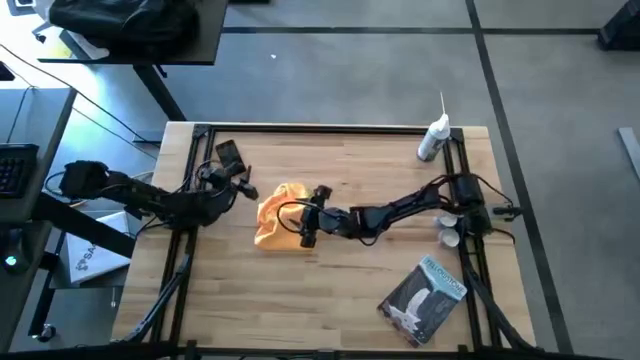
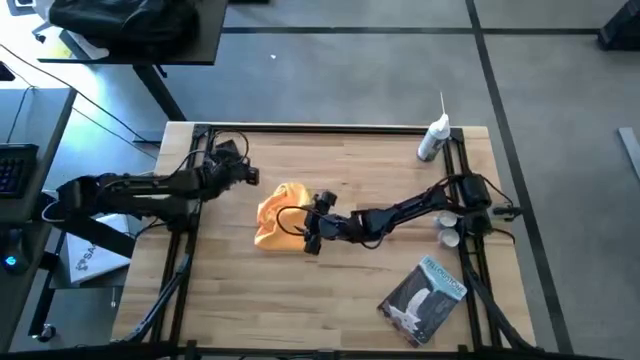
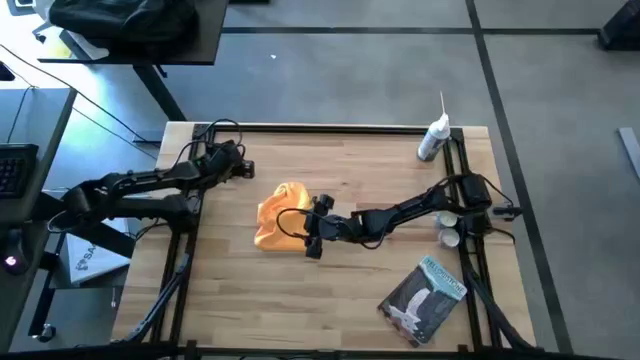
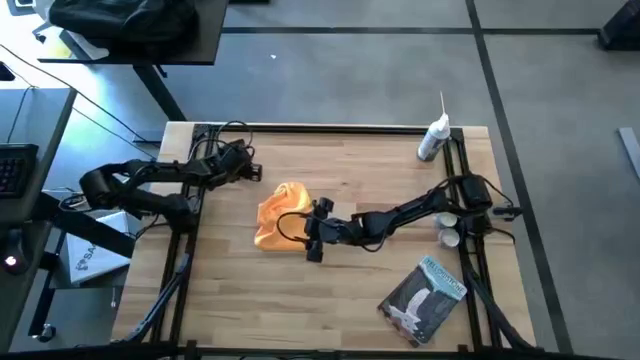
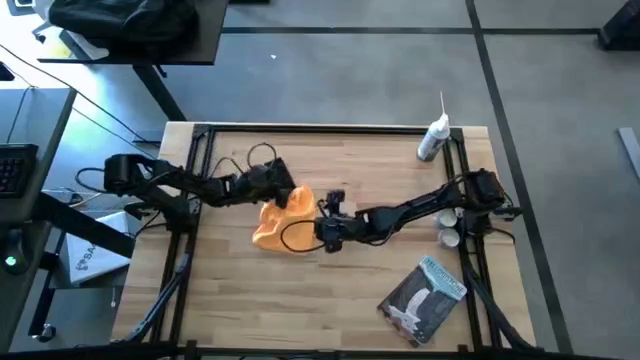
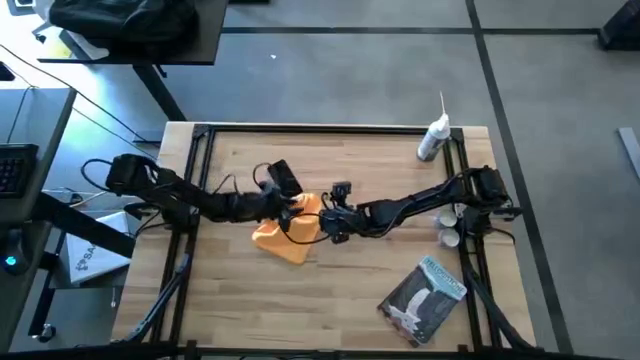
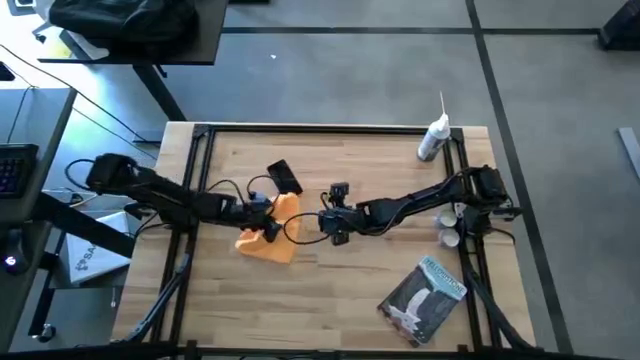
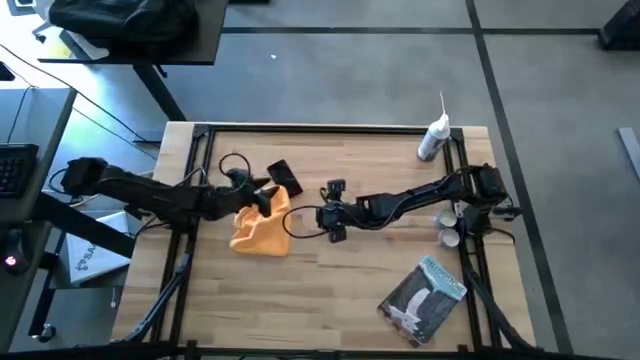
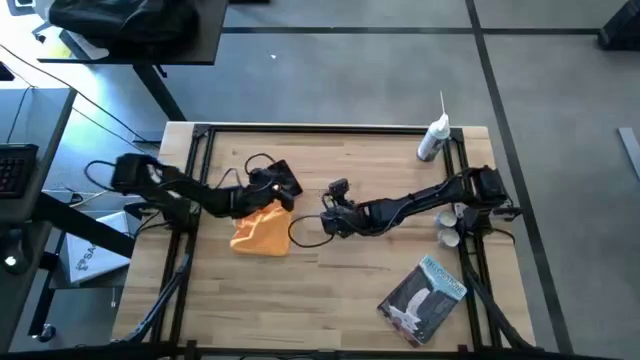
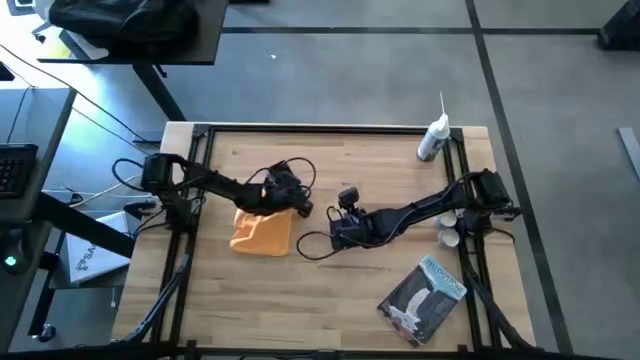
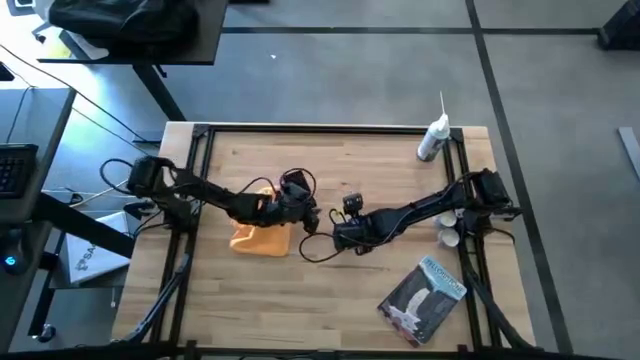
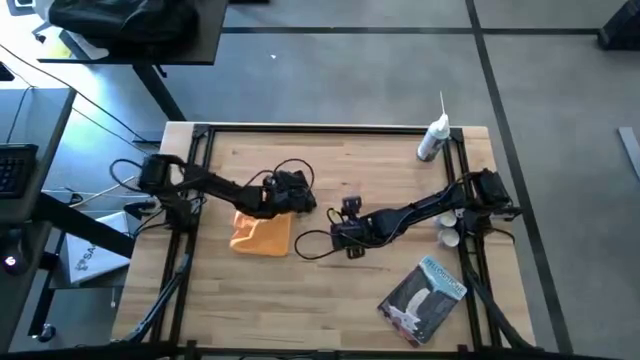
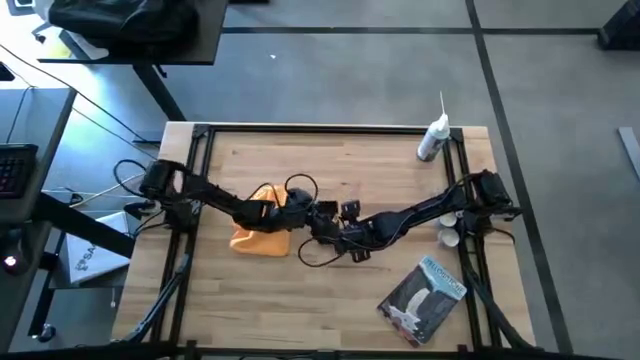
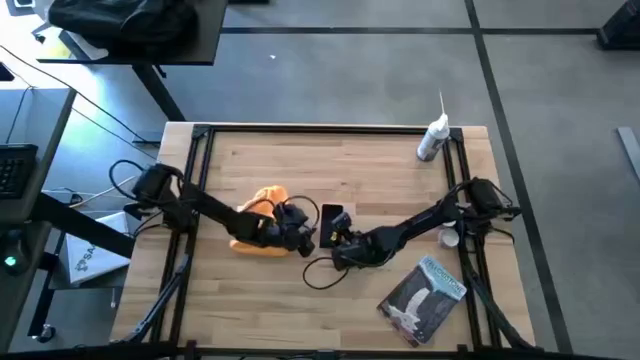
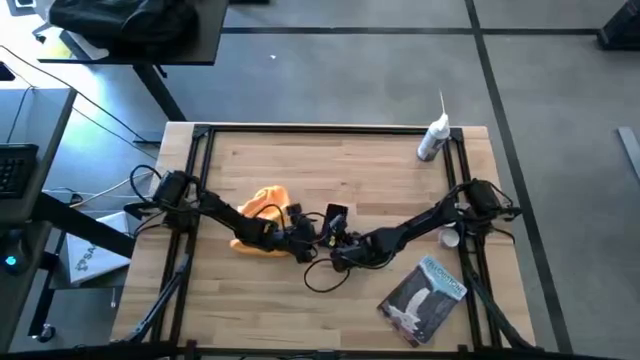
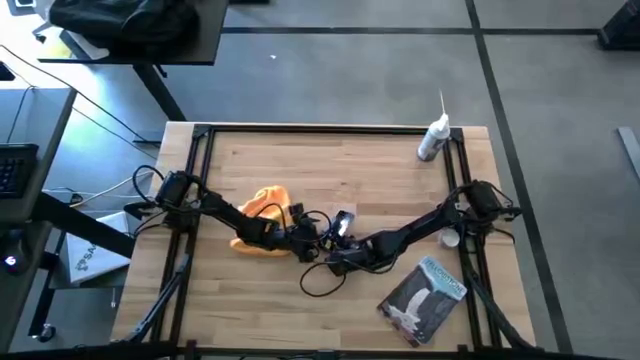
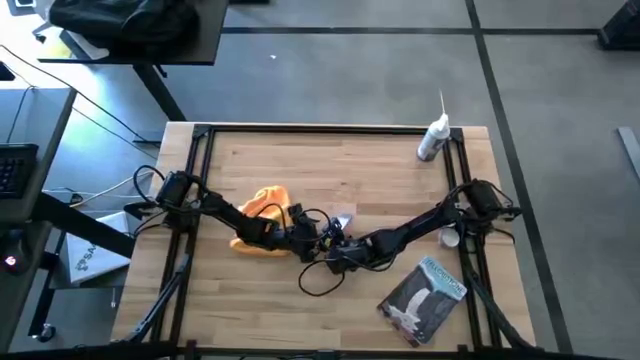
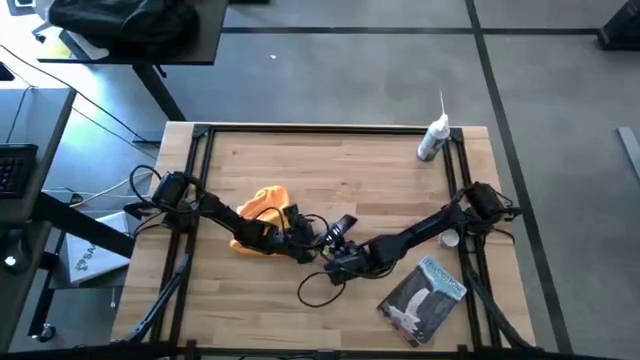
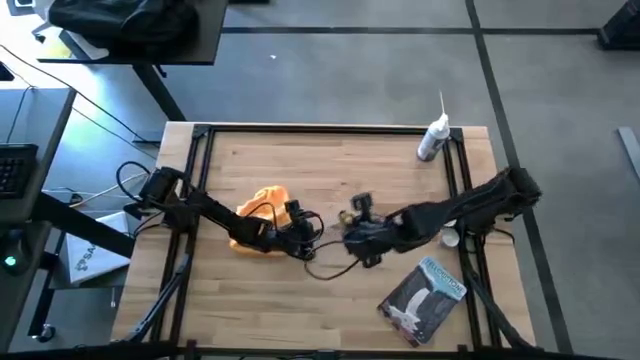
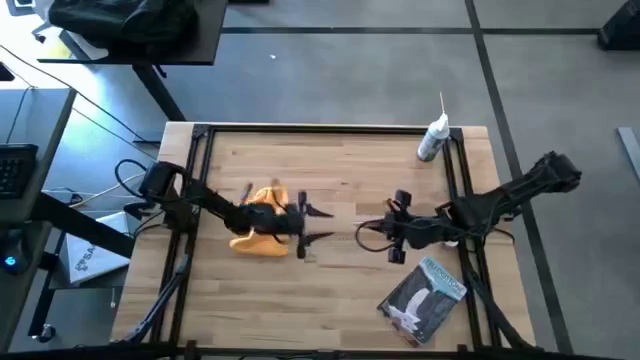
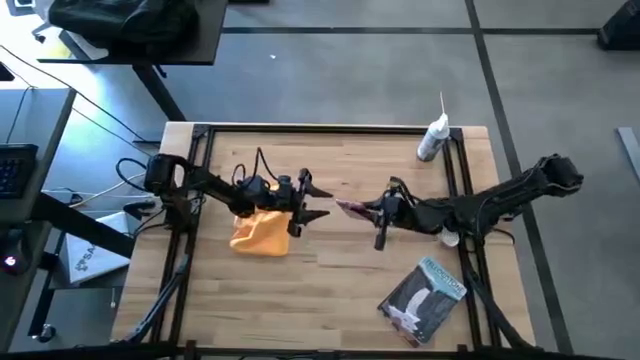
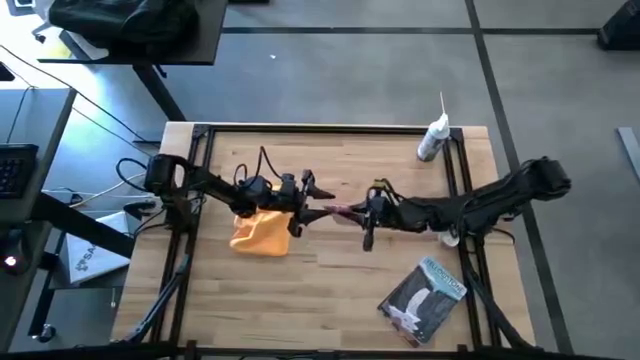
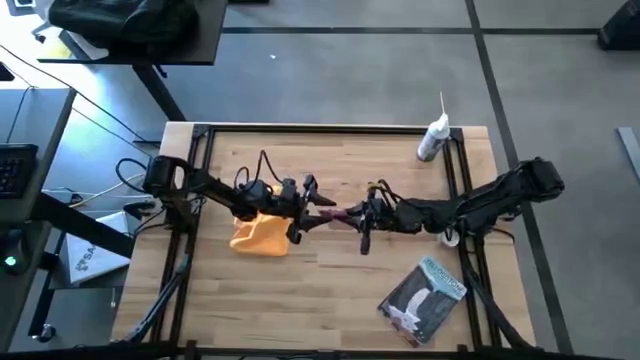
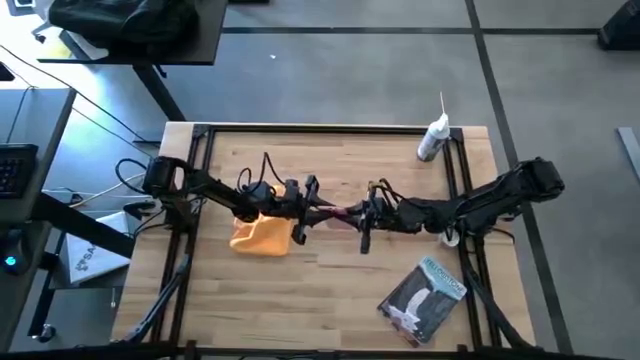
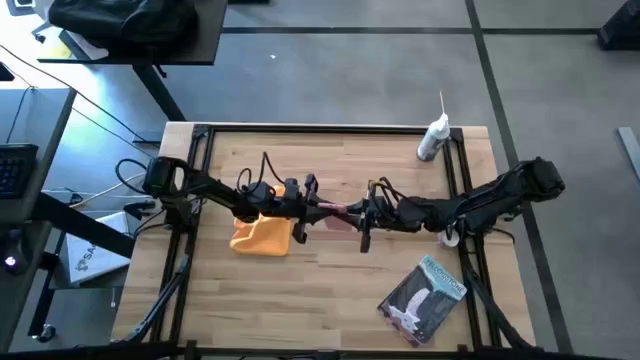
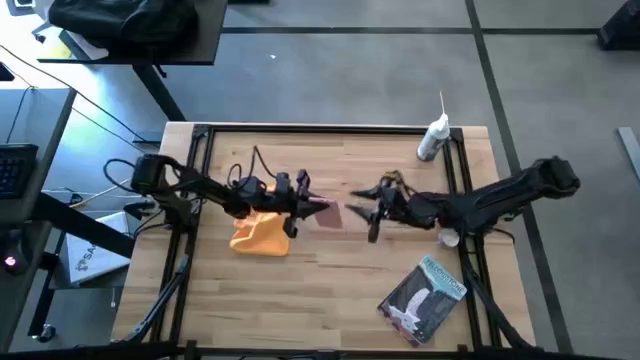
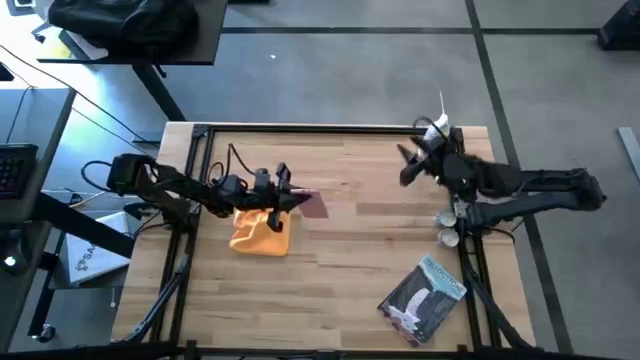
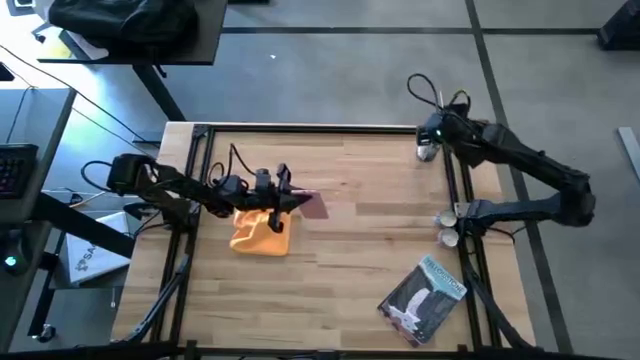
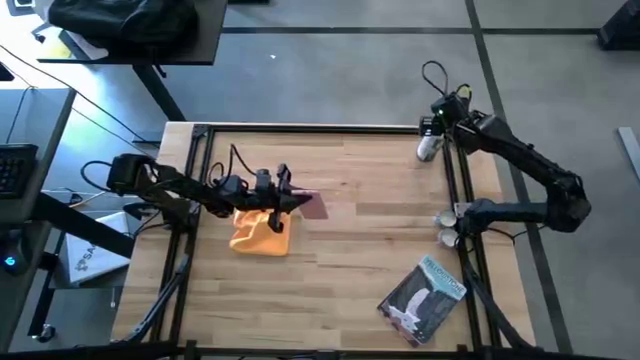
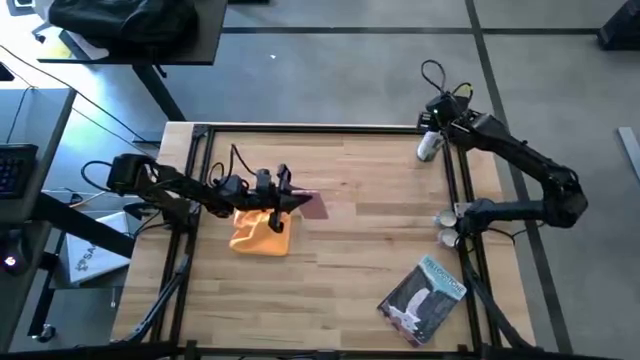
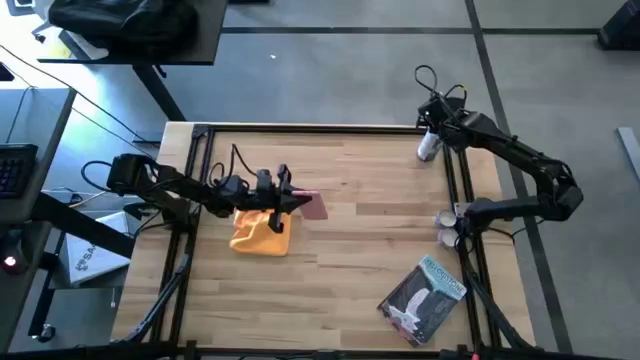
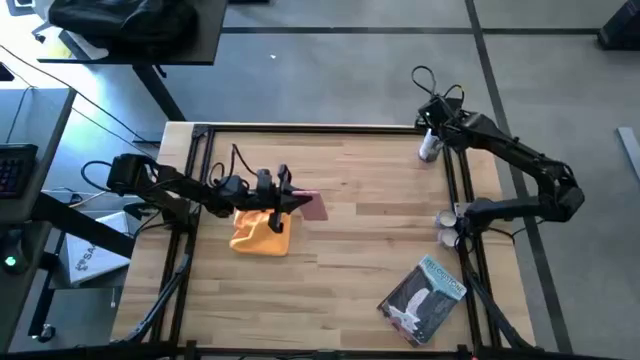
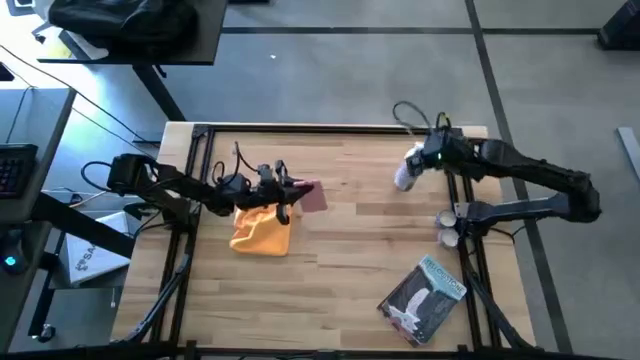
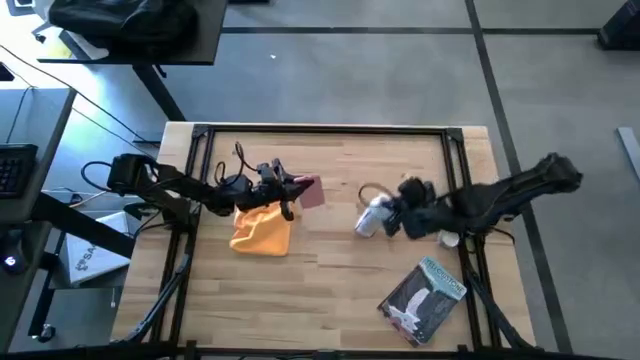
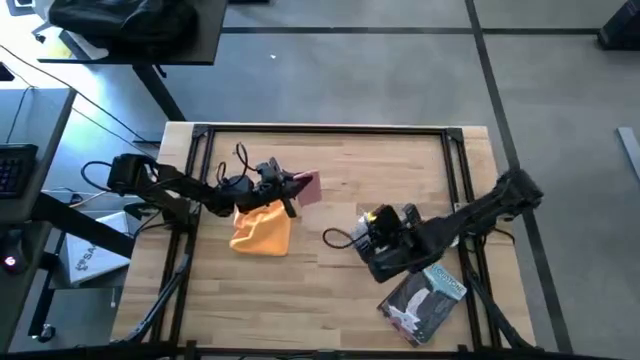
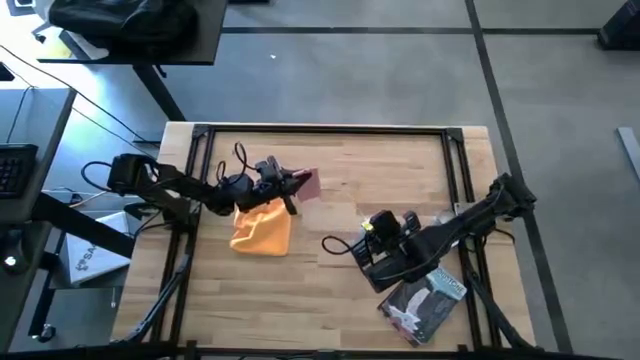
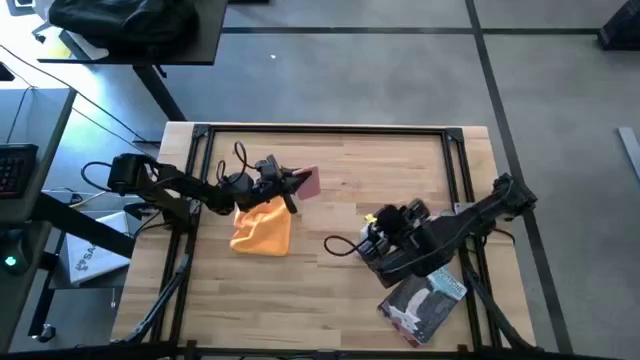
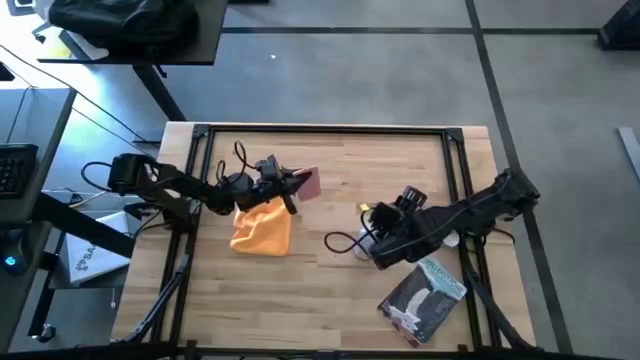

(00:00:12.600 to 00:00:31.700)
Task: Apply microfiber cloth
Spray the pink cellphone with the spray bottle

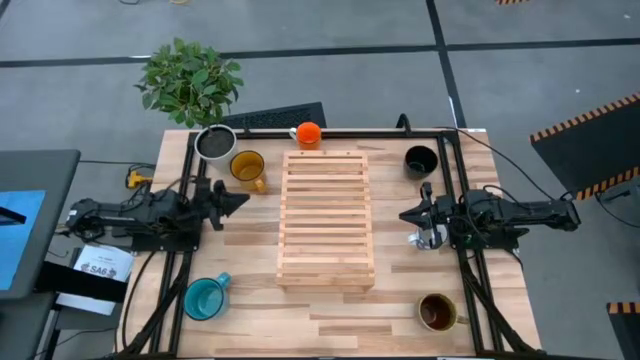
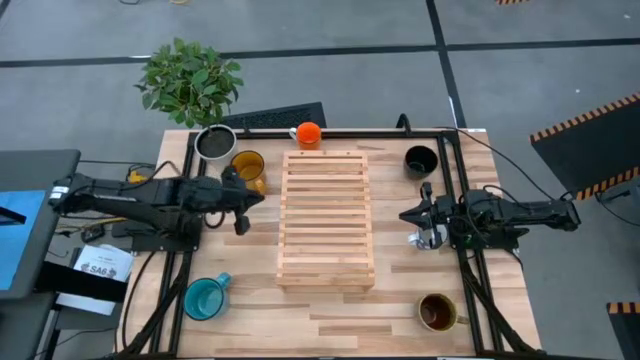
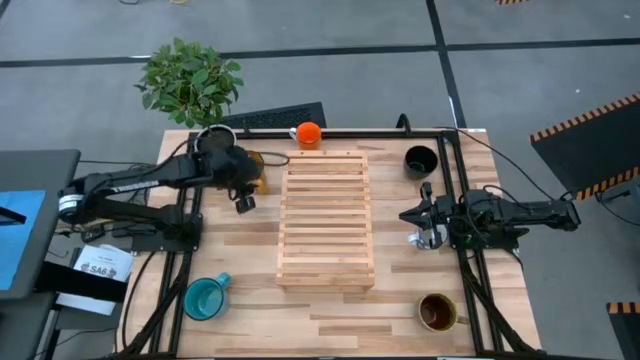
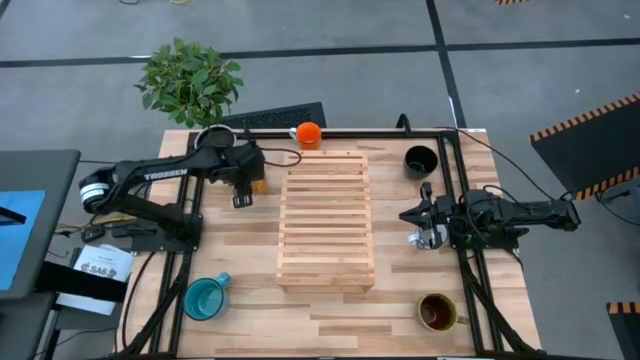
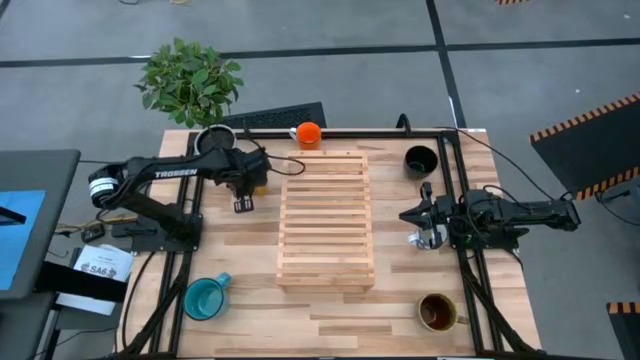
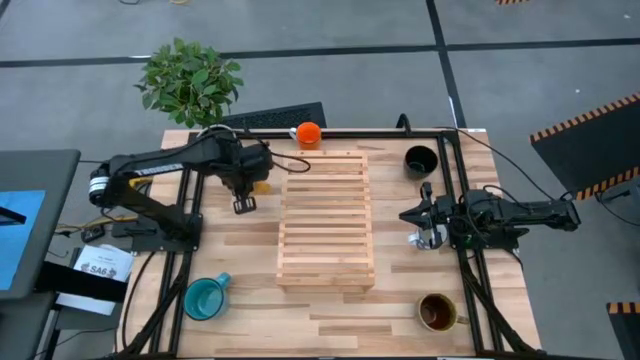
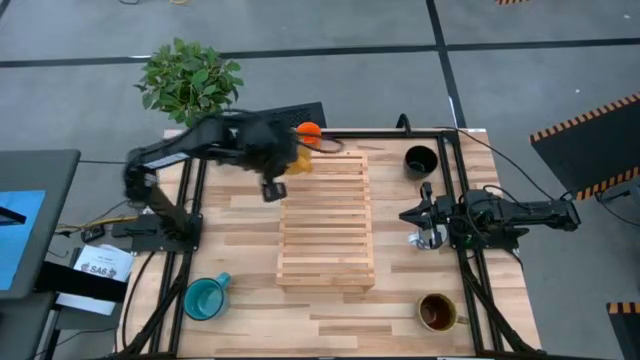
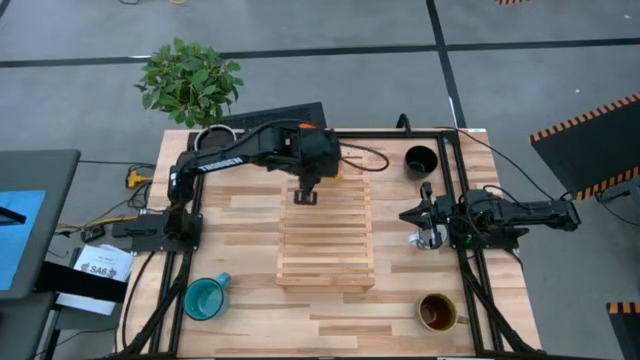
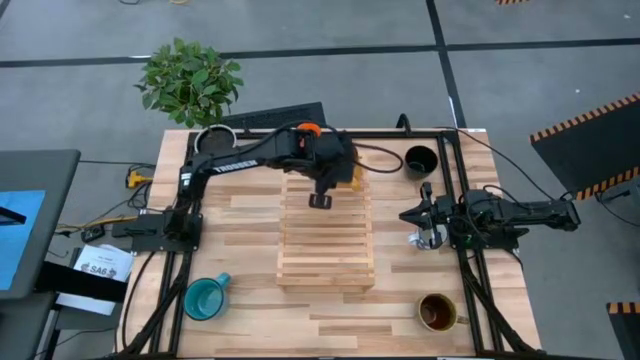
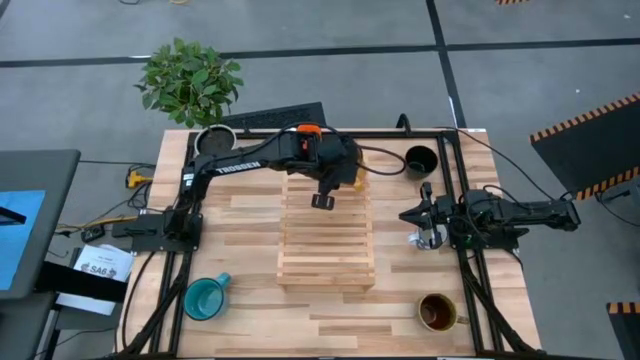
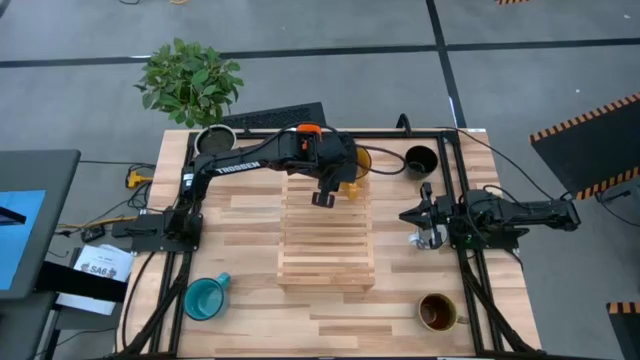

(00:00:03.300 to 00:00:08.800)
Task: Place coffee mugs
Put the yellow mug on the shelf
